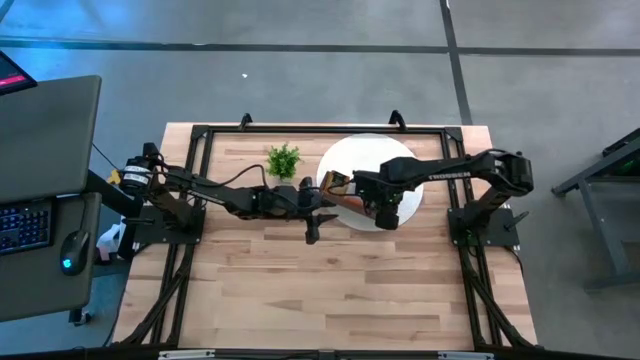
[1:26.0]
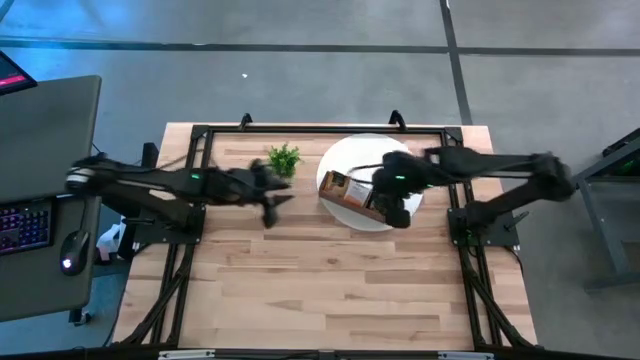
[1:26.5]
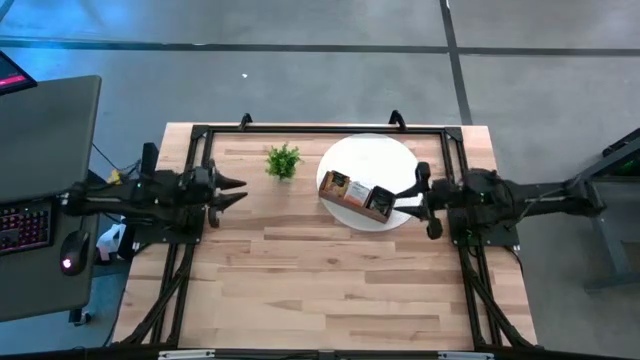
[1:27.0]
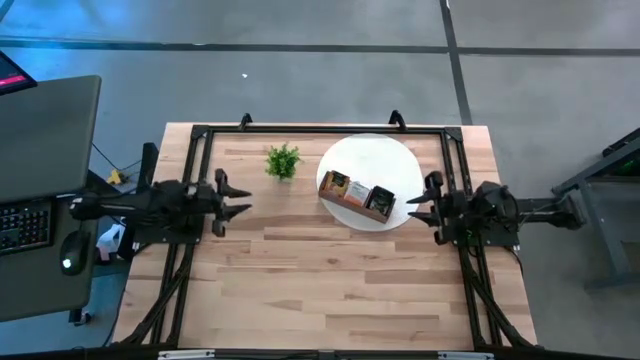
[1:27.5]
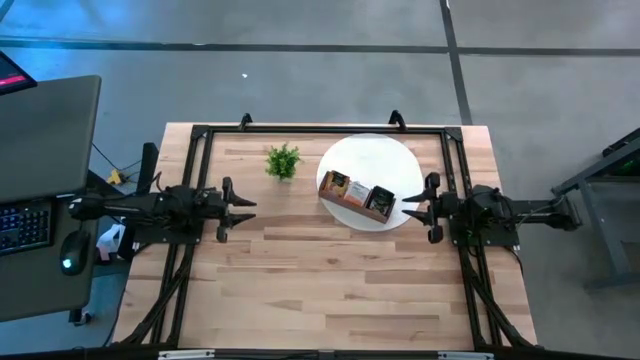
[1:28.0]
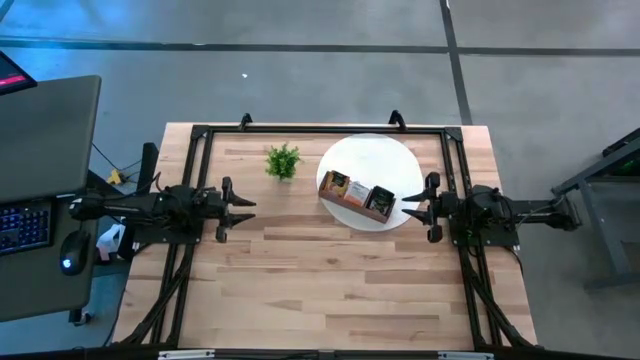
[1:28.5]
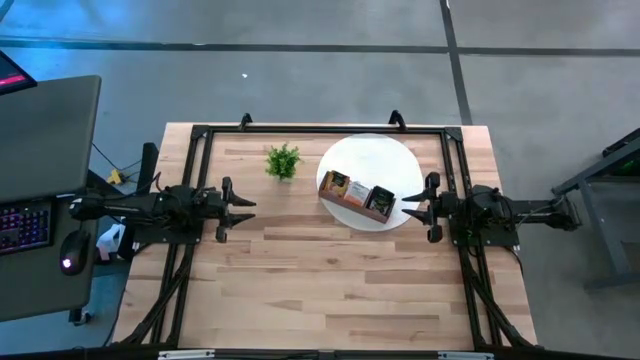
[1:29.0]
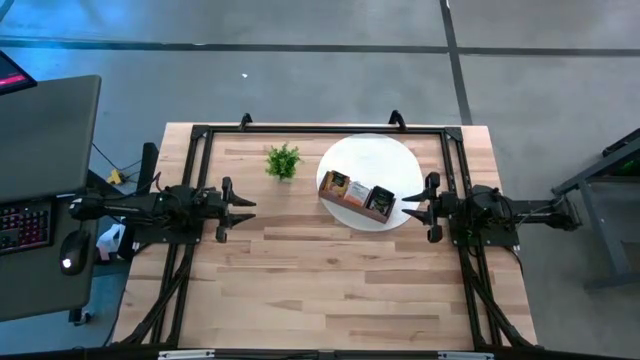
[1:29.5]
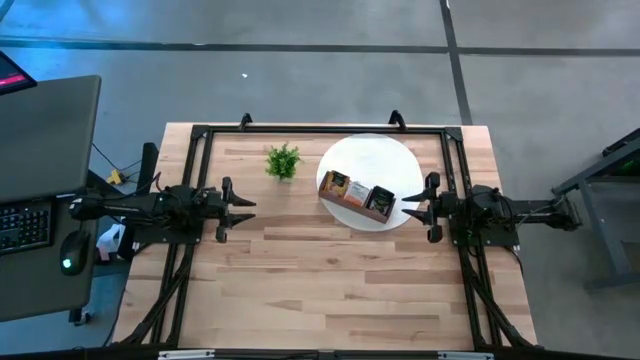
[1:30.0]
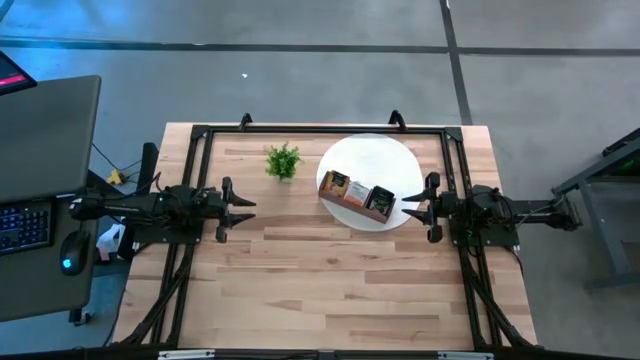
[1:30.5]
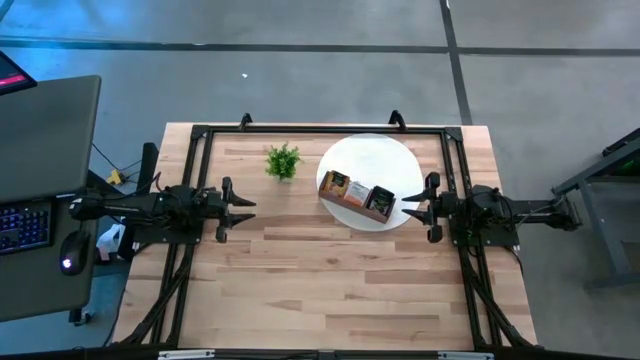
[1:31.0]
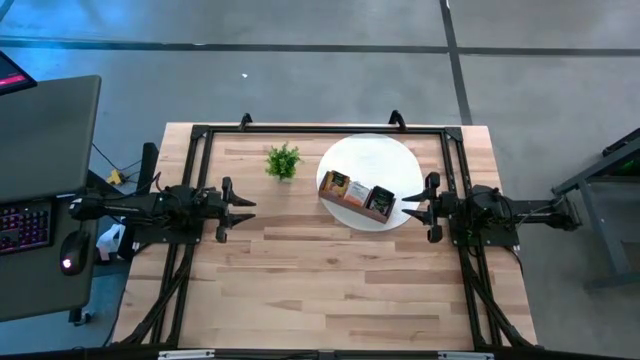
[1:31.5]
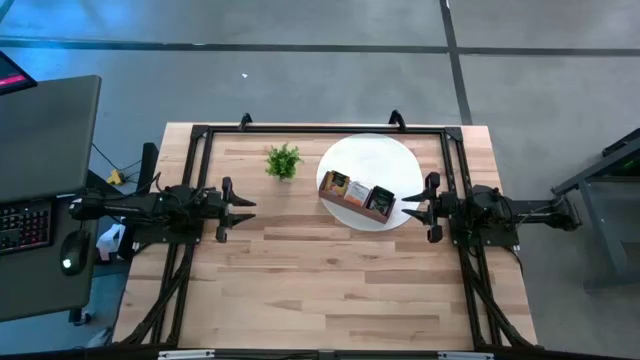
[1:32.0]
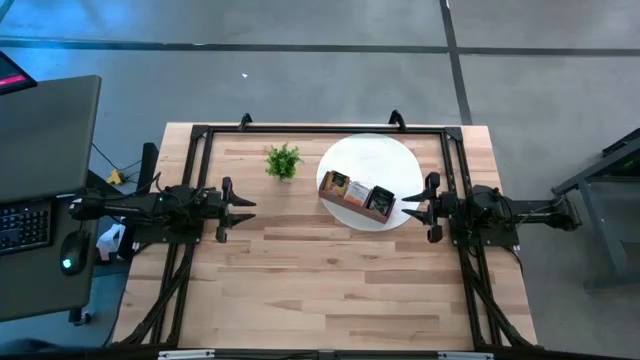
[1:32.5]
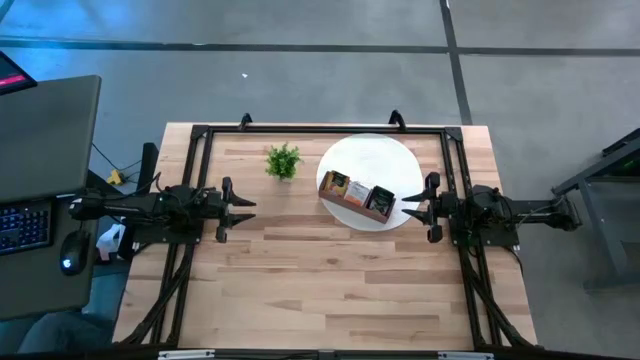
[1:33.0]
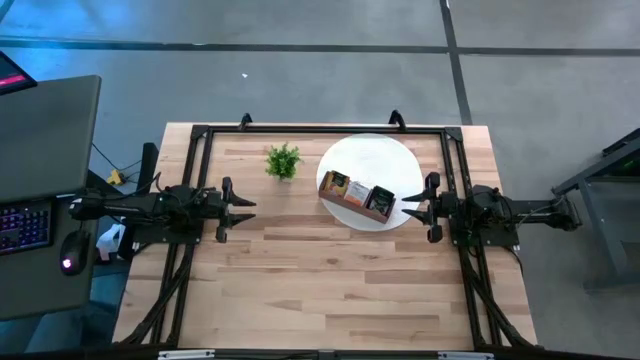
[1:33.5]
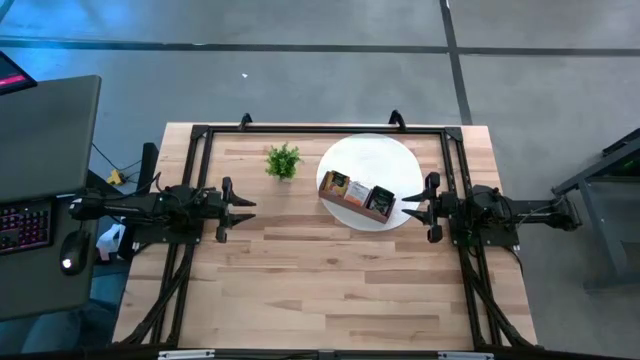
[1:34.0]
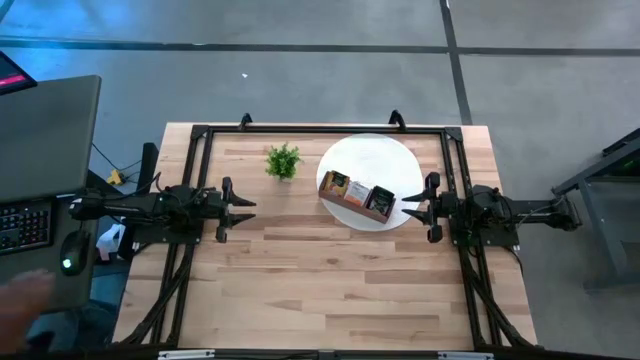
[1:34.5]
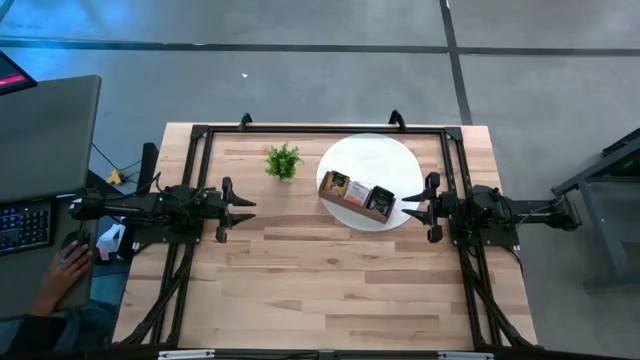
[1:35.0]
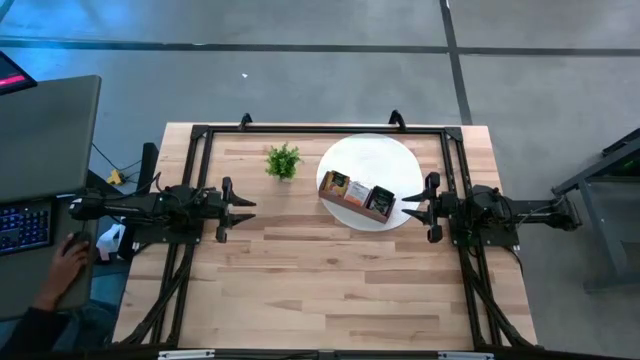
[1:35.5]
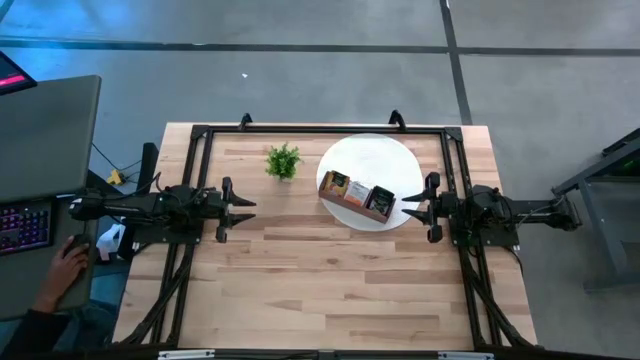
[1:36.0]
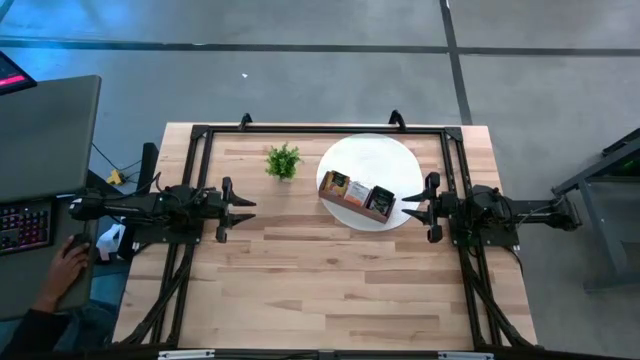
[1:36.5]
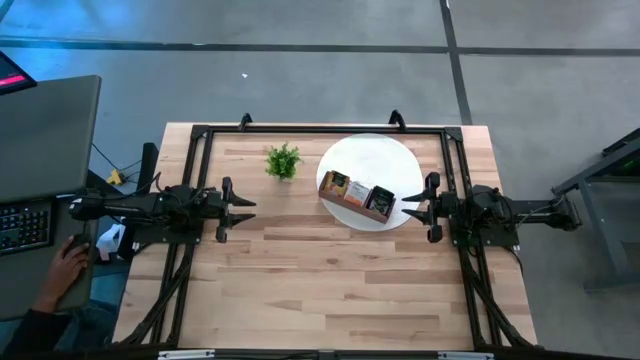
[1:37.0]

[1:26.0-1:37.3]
Task: Pick & Place Tea
Return to Home Position

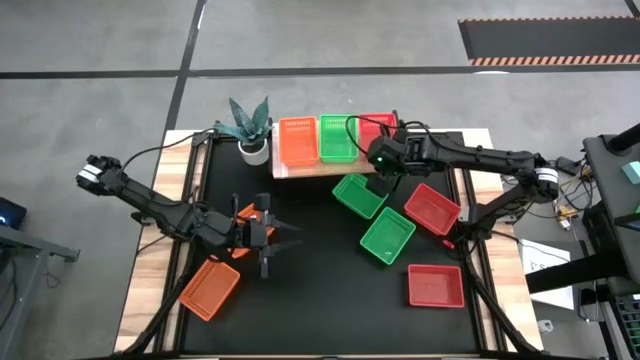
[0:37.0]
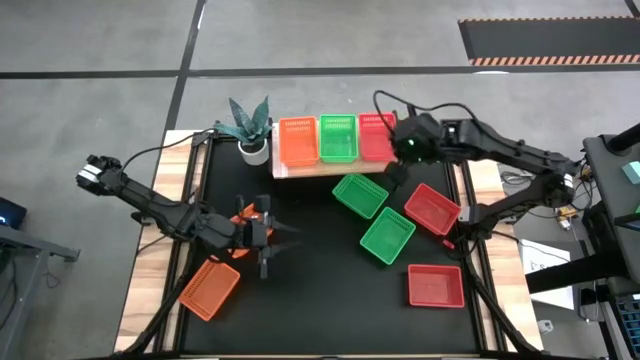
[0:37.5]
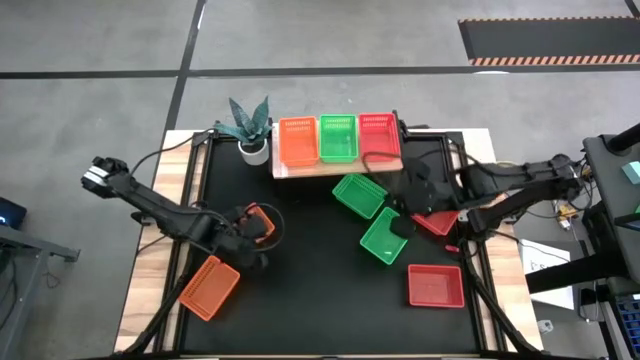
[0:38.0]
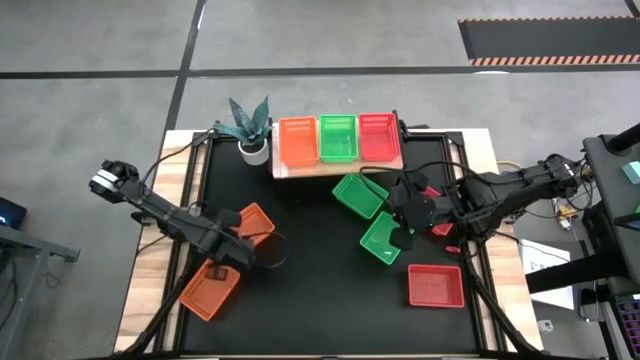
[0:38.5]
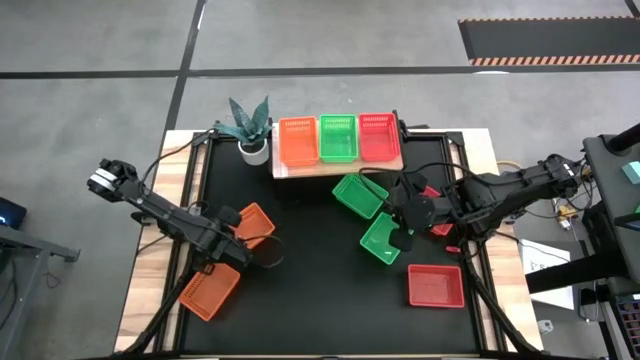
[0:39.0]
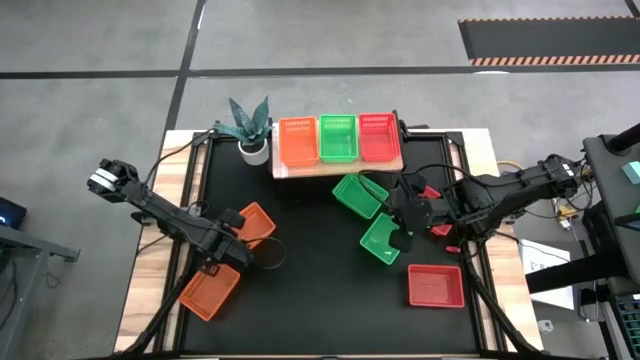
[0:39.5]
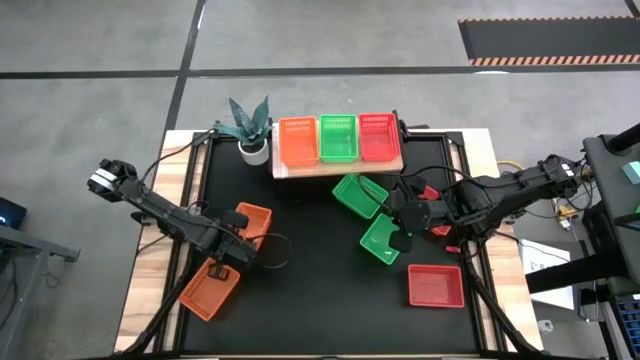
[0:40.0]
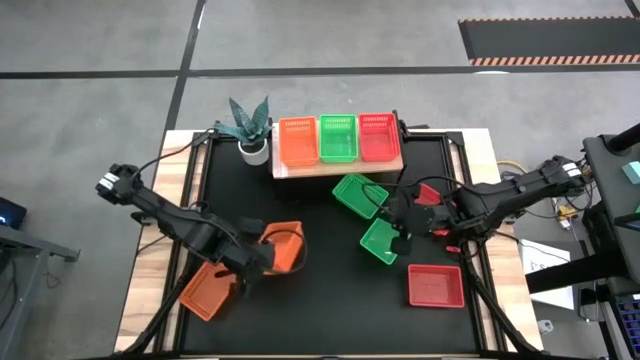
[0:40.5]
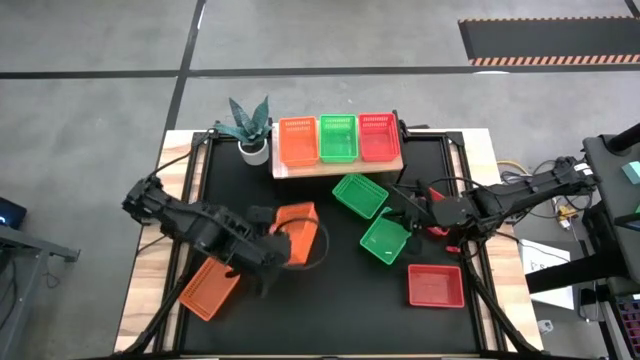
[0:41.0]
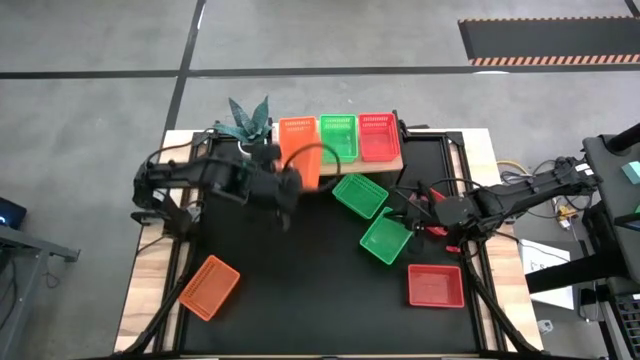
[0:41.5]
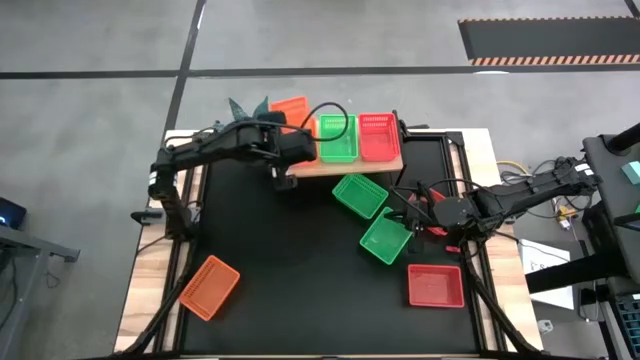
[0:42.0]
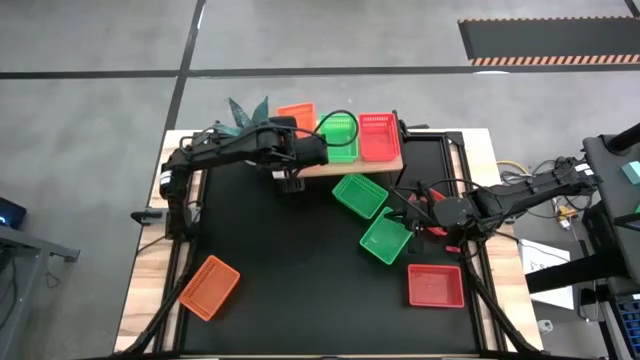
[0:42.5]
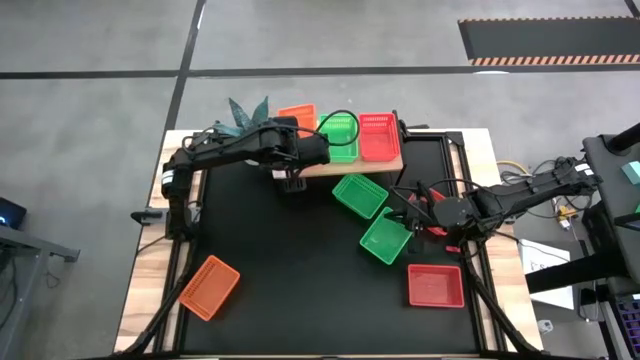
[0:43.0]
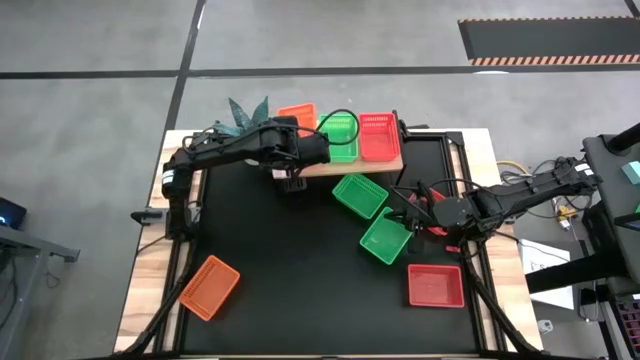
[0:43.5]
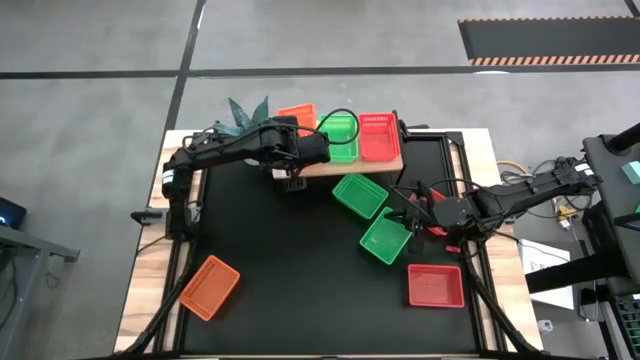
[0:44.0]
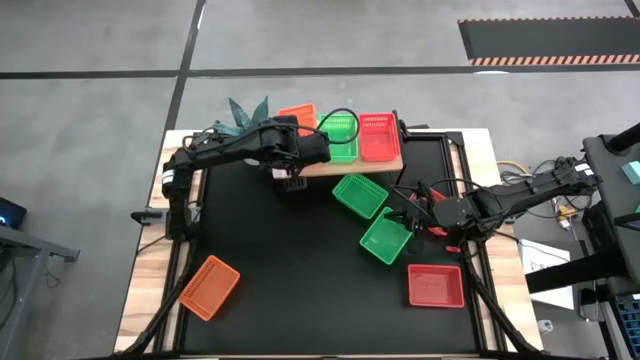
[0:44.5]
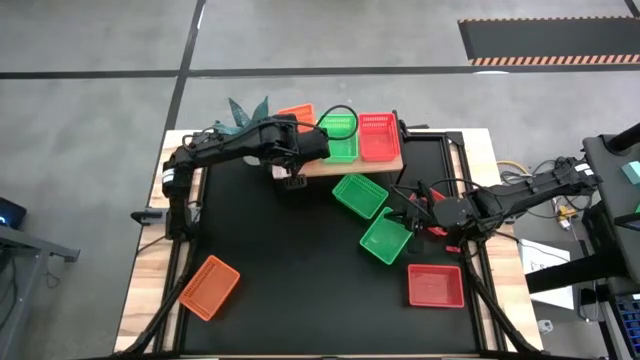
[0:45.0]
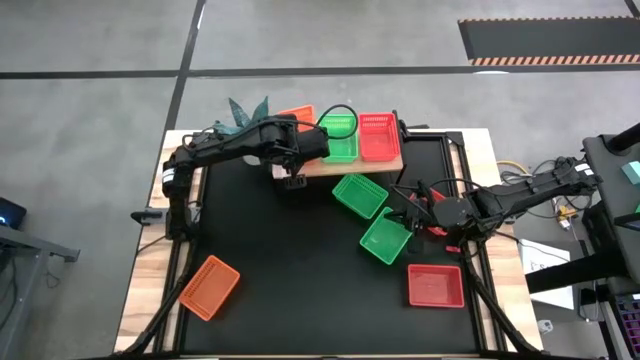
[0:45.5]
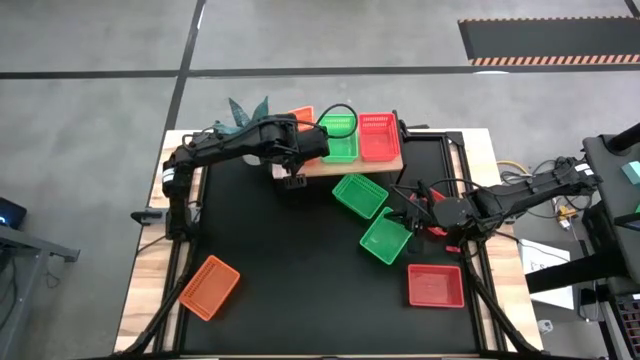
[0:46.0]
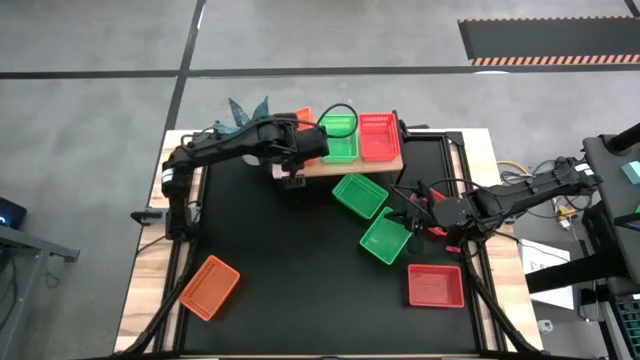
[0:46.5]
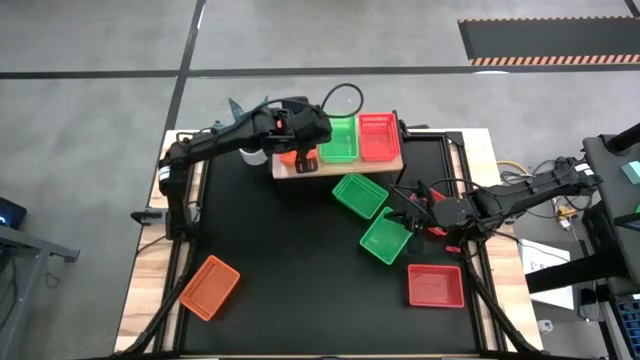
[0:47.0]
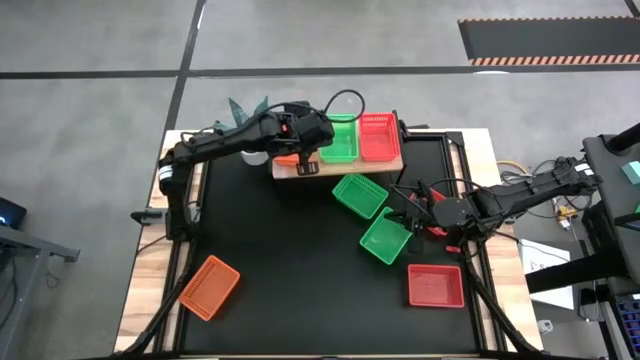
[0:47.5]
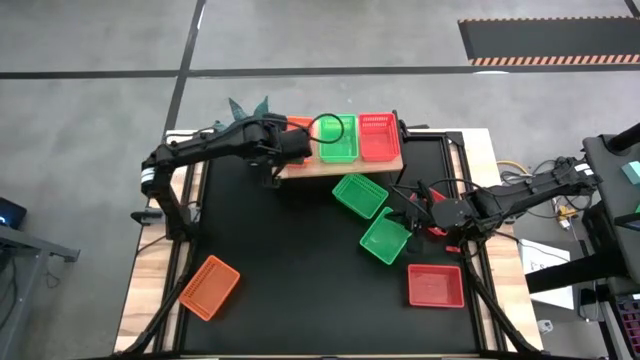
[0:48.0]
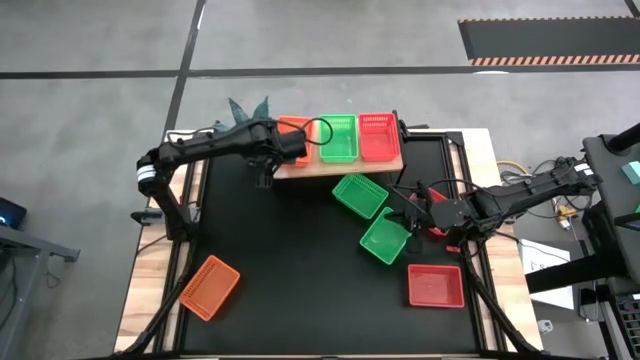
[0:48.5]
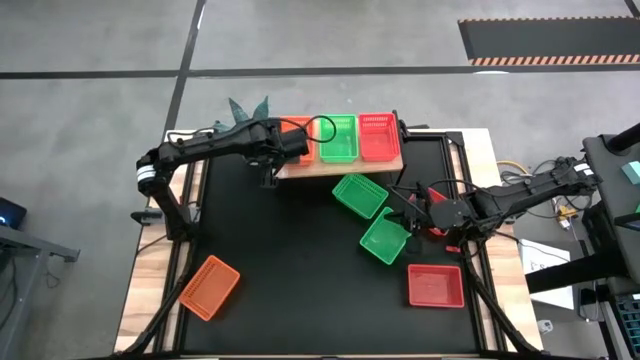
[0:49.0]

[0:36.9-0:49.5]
Task: Stack baskets on shelf by color
Stack the top orange bin on top of the orange bin on the shelf
